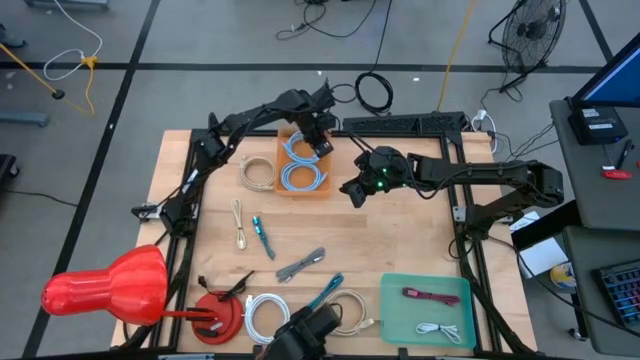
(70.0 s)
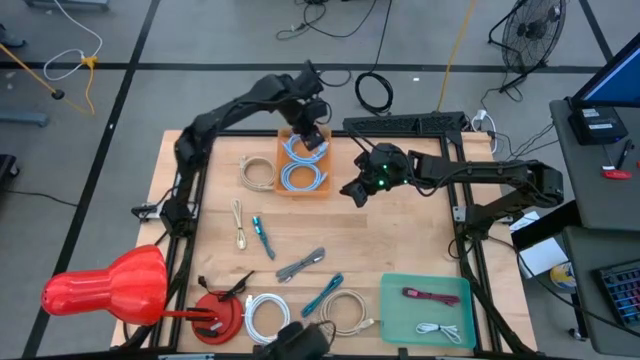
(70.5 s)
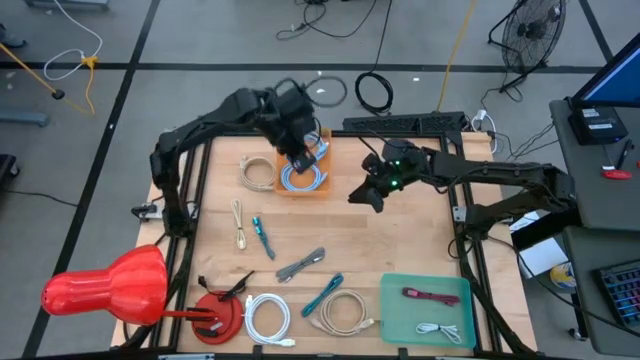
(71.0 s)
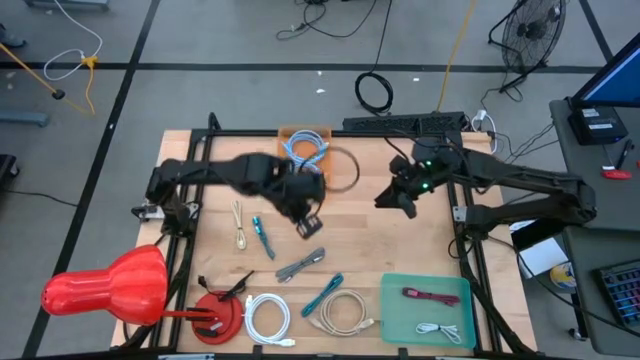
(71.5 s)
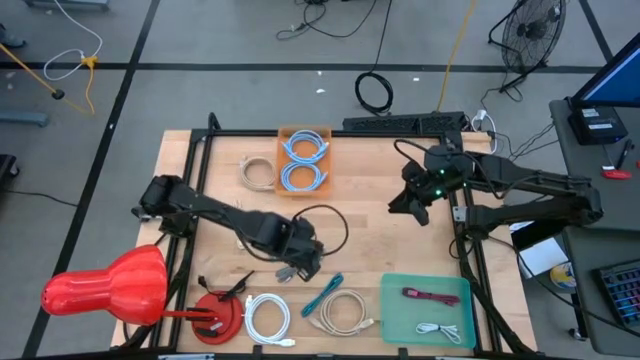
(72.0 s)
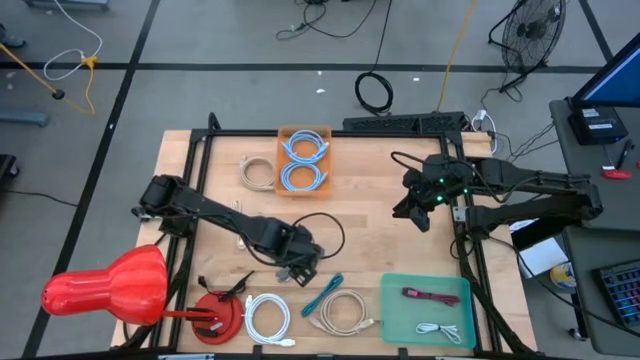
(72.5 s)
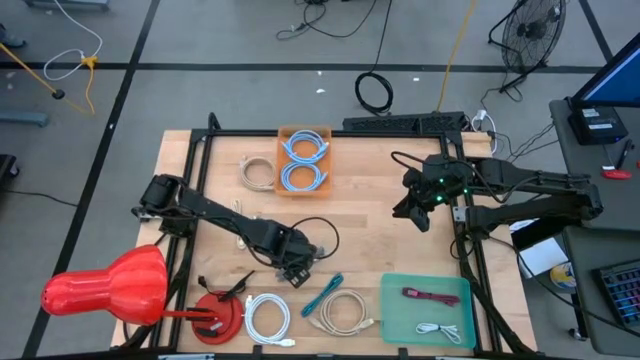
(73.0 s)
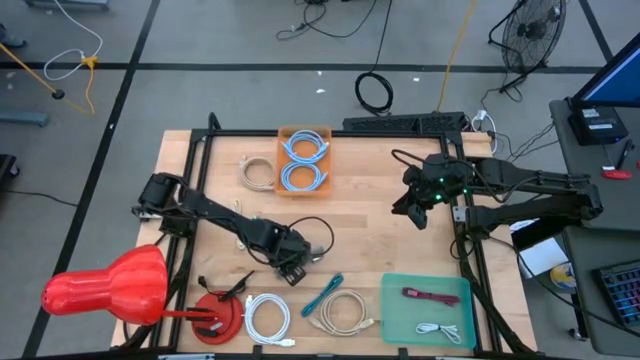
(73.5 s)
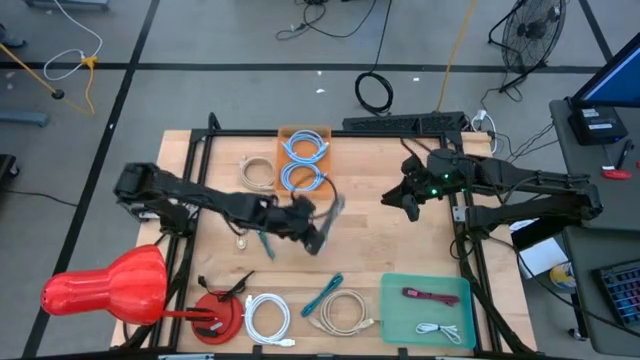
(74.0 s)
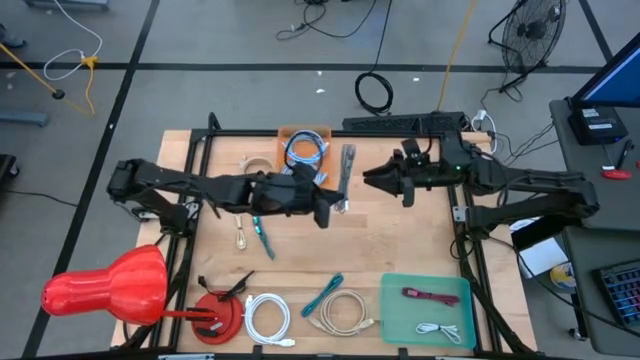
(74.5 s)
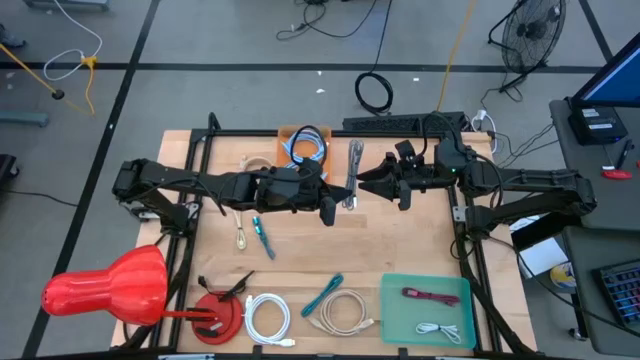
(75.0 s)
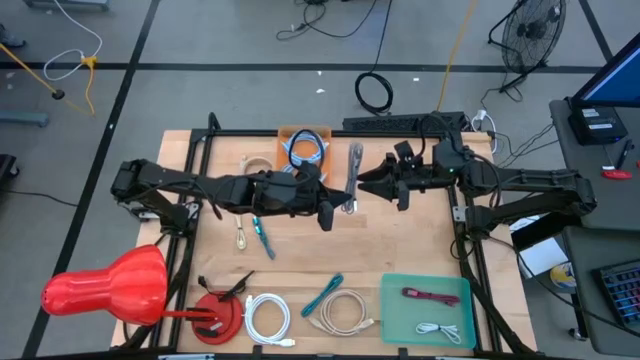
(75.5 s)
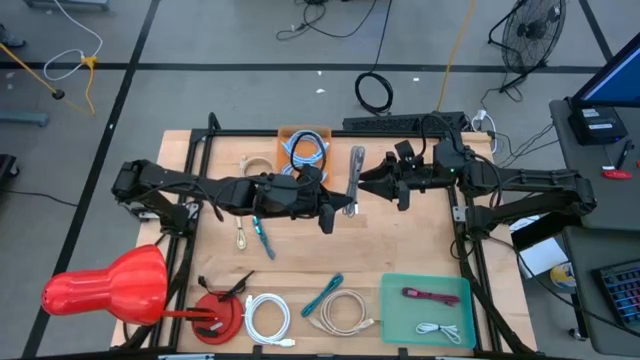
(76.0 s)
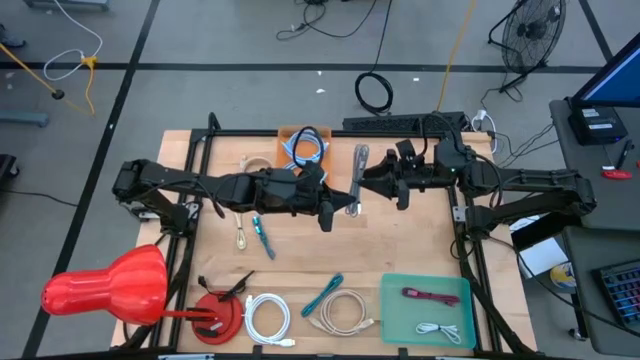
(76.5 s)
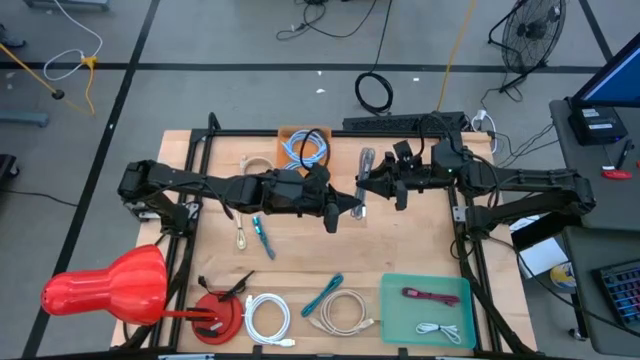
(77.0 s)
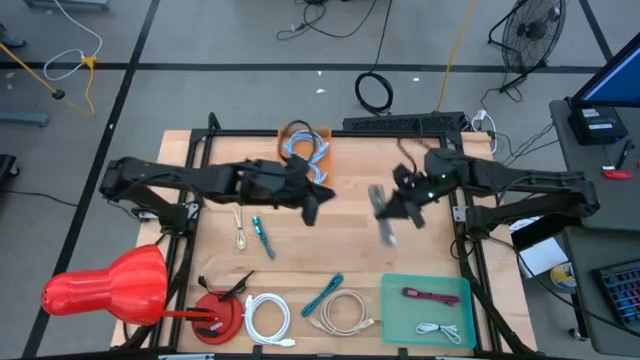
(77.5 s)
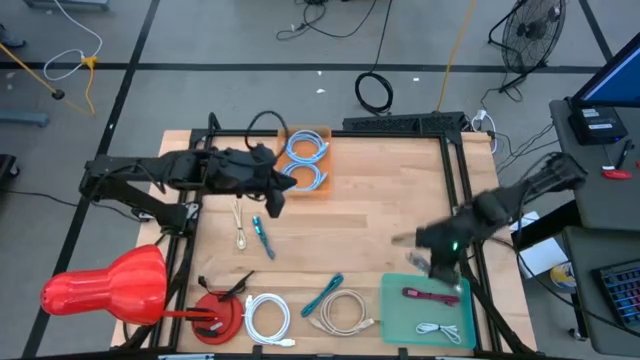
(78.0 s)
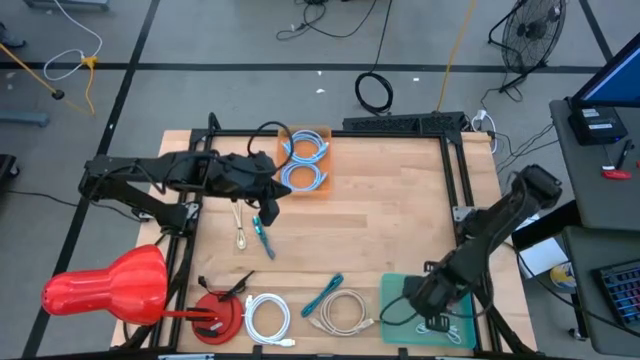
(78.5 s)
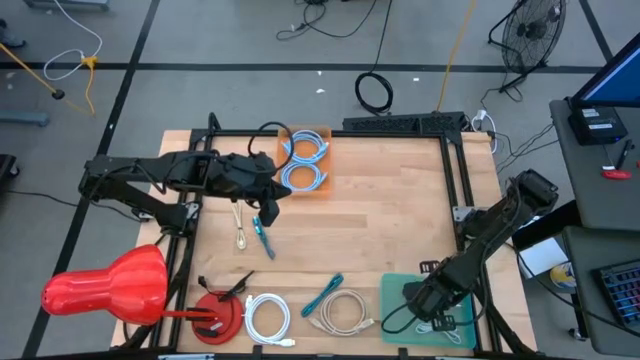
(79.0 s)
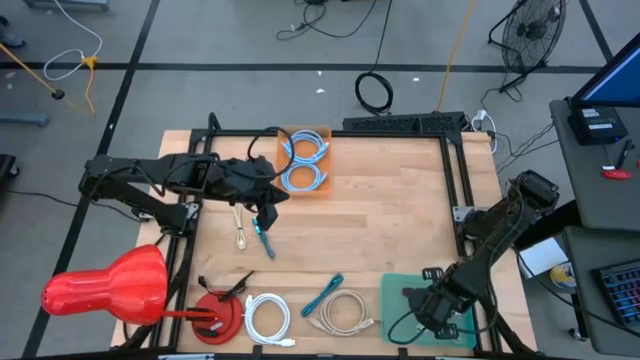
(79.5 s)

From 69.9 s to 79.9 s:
Task: Pick & Place USB Port
Put the white patterned usb cable into the blue bin
